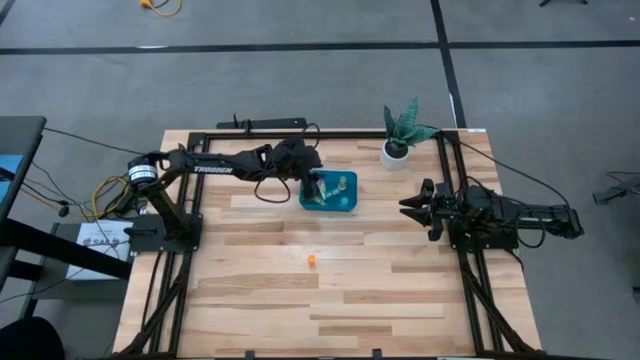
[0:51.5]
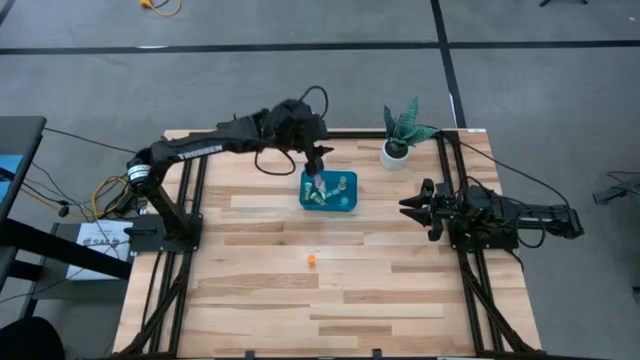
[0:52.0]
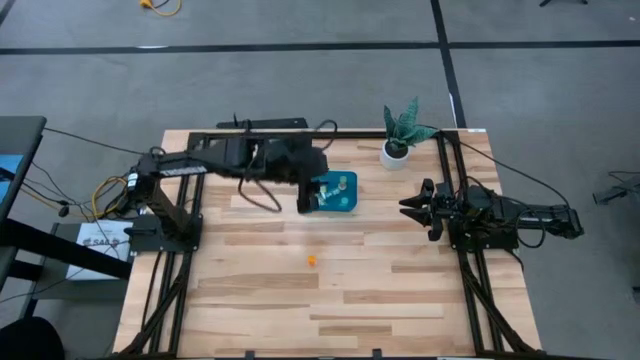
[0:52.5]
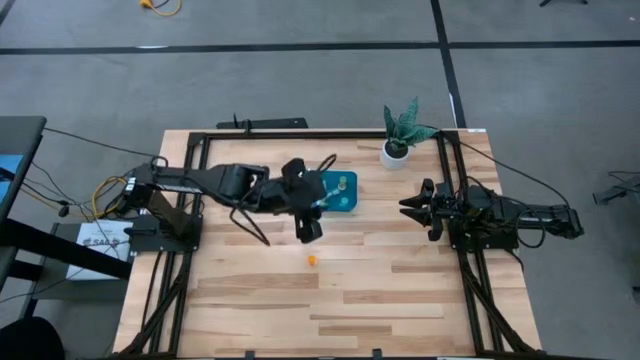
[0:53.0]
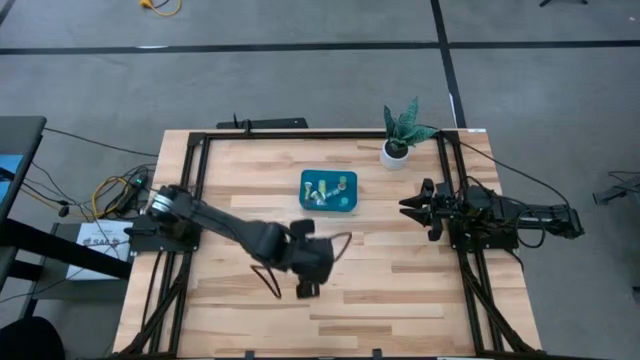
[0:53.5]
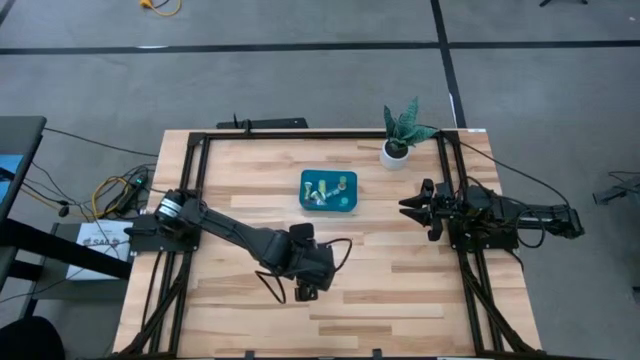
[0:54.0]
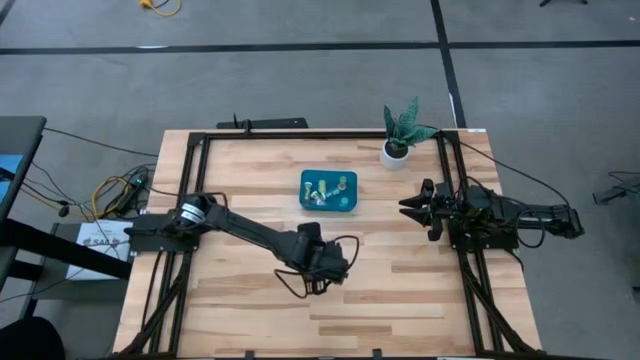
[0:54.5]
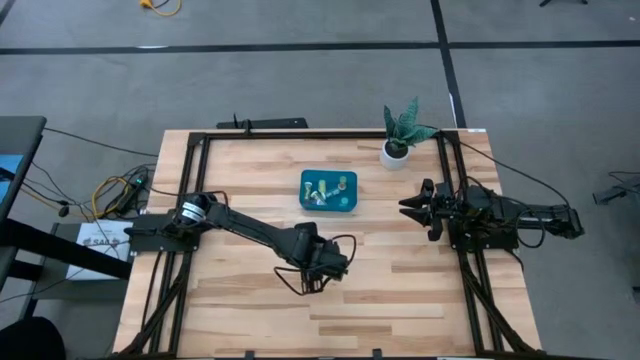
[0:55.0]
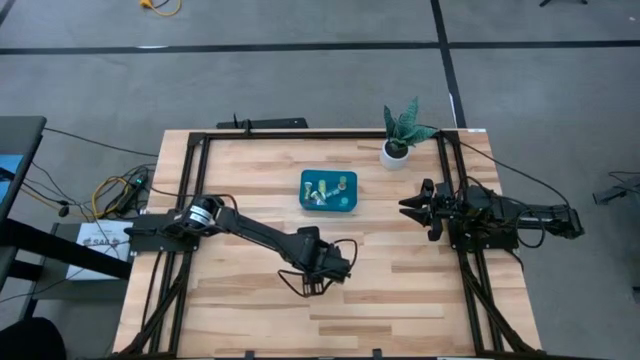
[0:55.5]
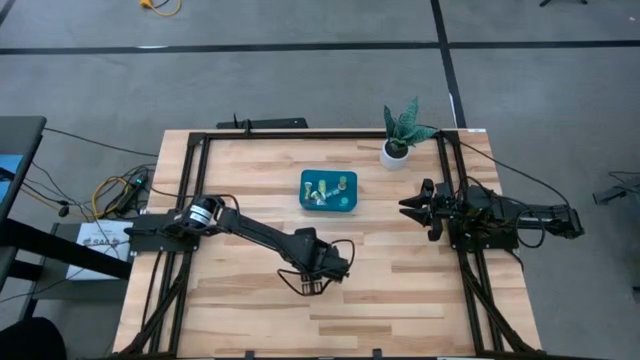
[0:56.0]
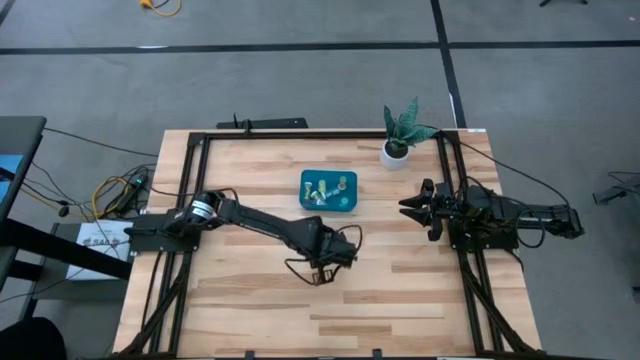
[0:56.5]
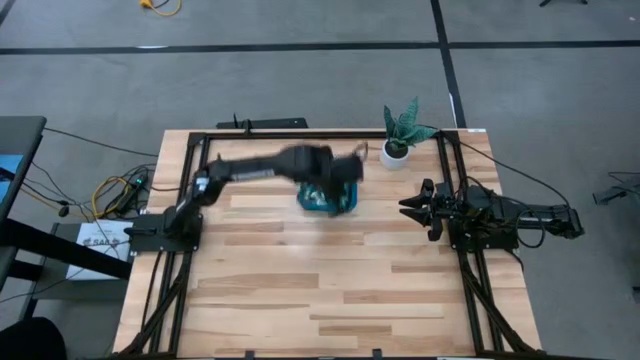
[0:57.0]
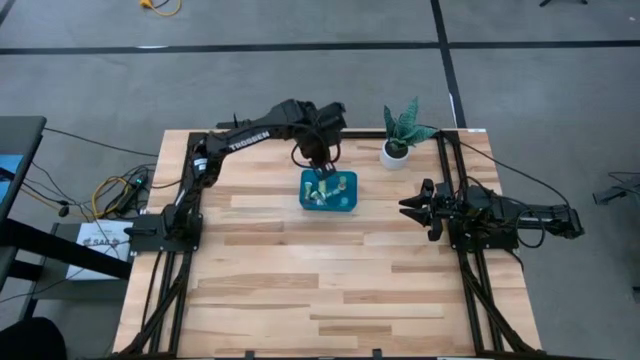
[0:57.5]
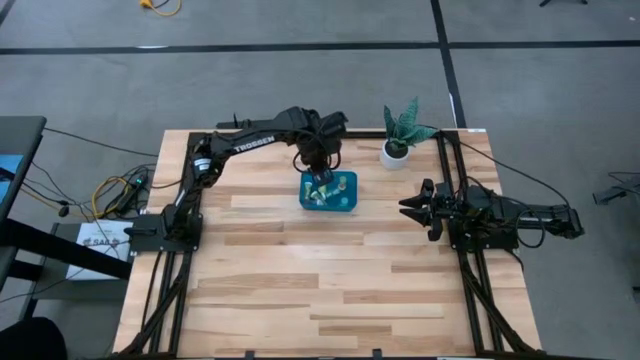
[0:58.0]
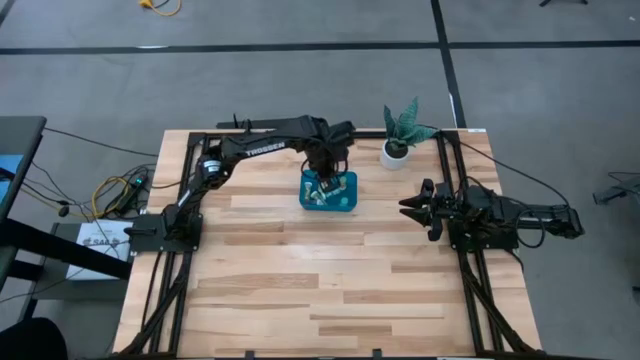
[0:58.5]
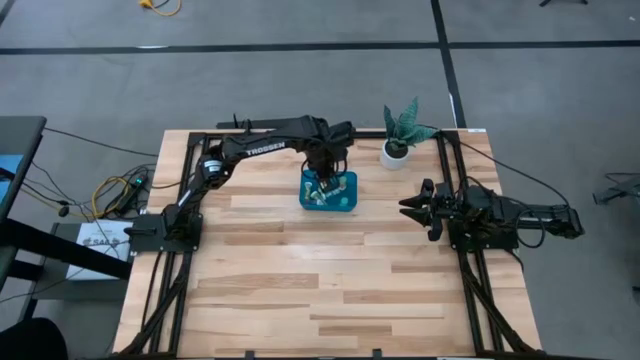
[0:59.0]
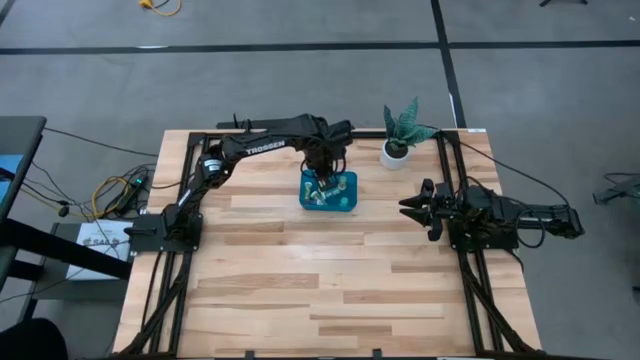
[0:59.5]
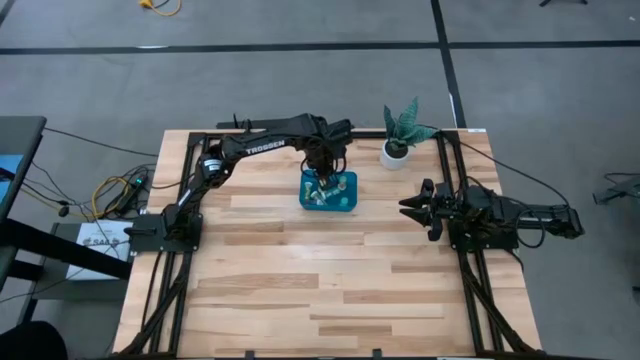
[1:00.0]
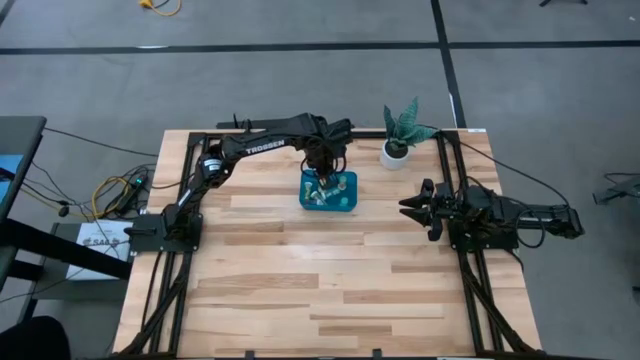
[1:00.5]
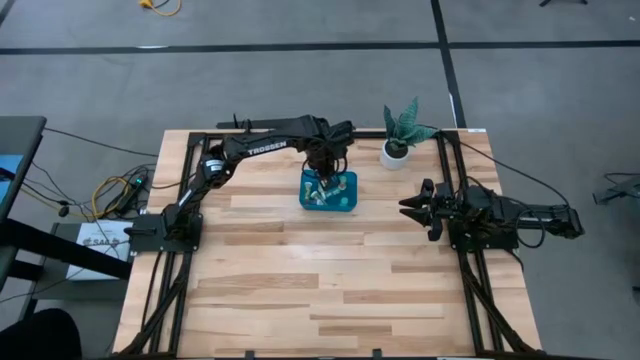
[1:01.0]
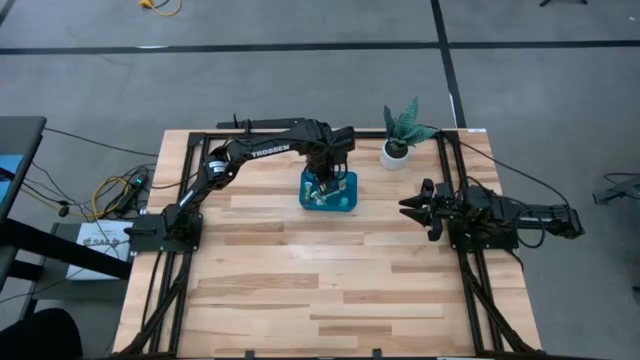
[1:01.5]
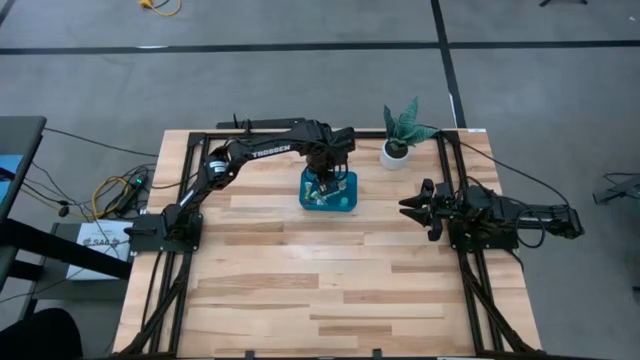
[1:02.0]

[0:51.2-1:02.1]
Task: Pick and place pill bottles into a basket
Put the orange medicine bottle into the blue bin

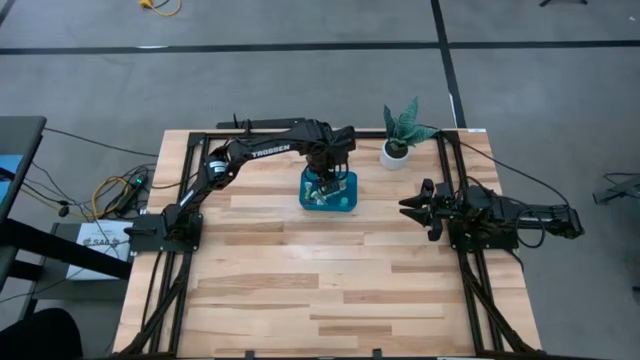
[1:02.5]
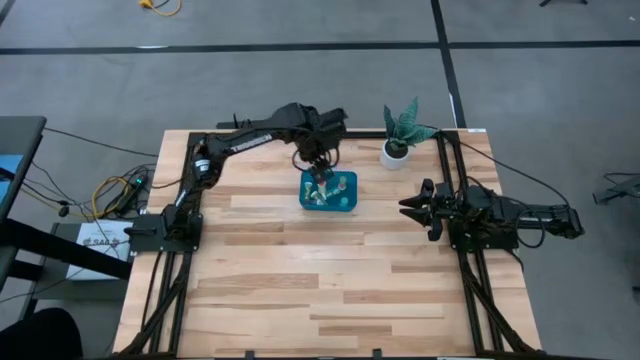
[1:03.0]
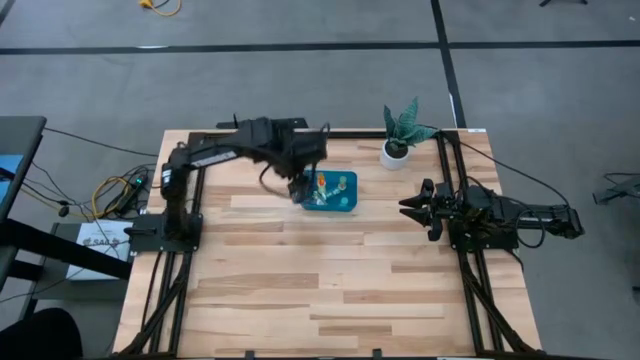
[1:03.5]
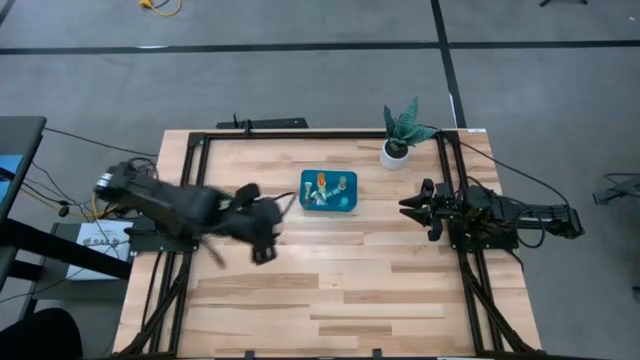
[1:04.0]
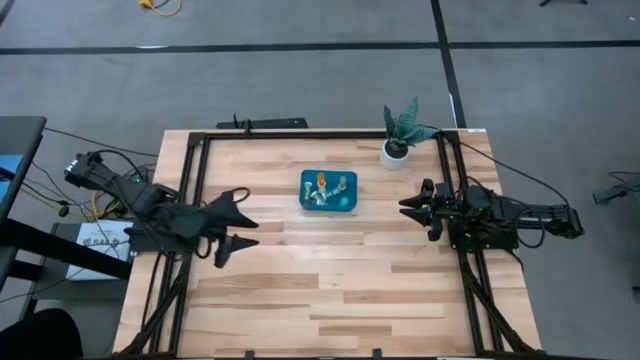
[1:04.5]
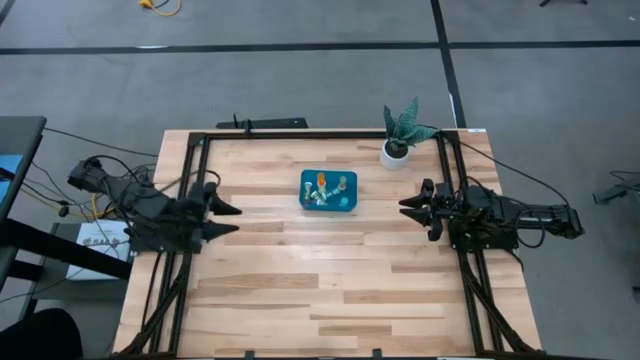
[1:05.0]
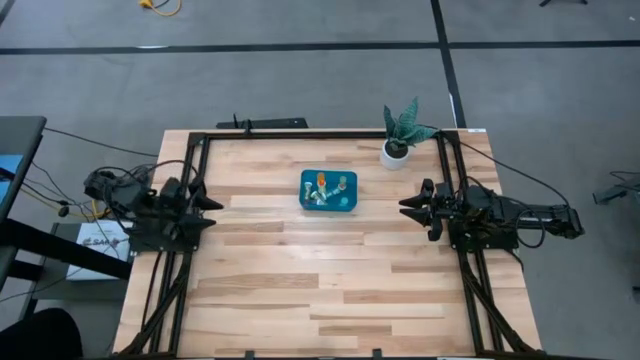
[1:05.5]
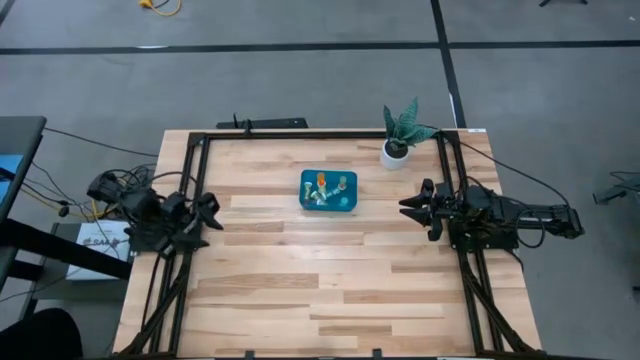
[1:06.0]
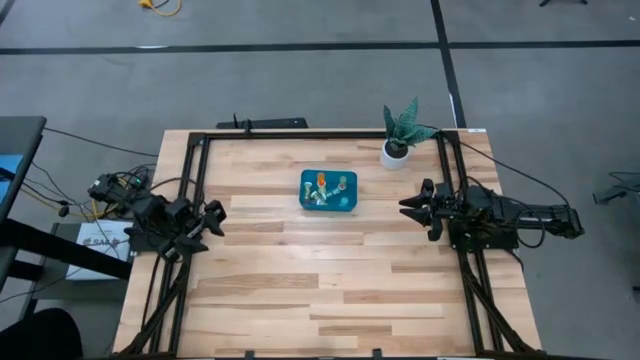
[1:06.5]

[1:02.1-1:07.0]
Return to Home Position

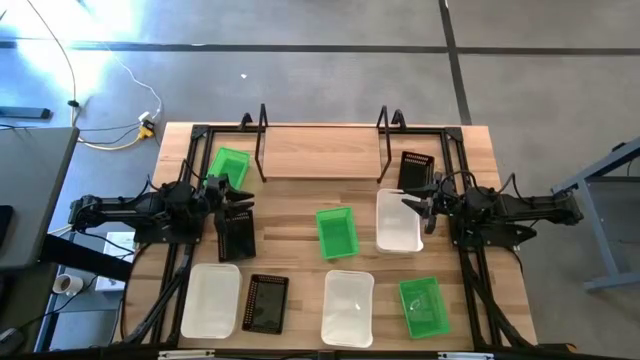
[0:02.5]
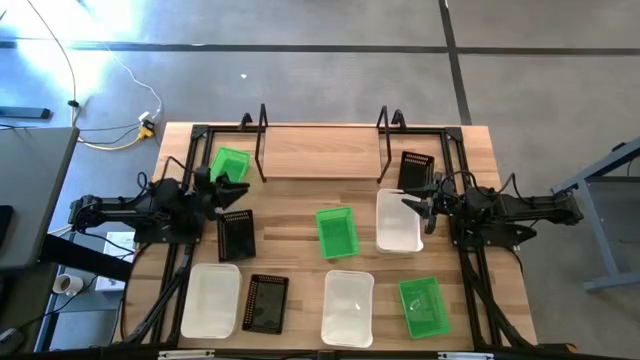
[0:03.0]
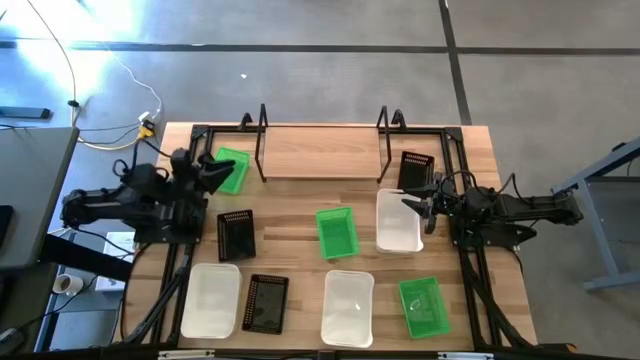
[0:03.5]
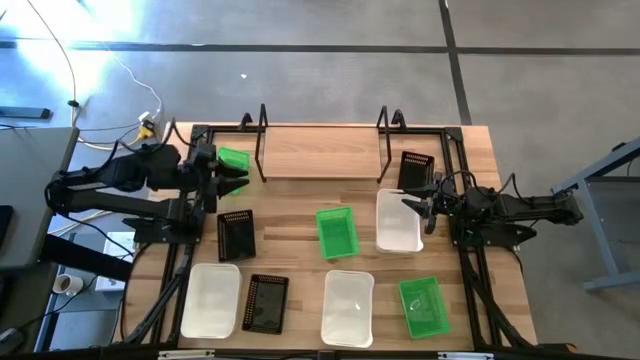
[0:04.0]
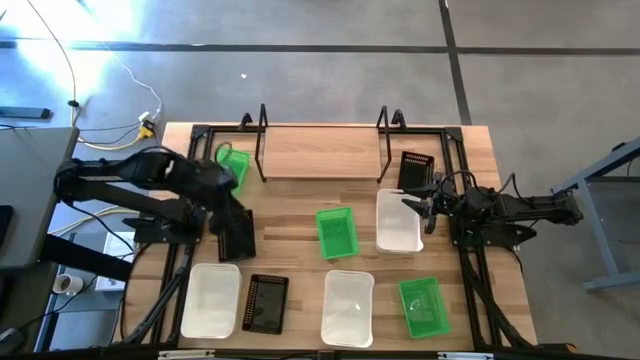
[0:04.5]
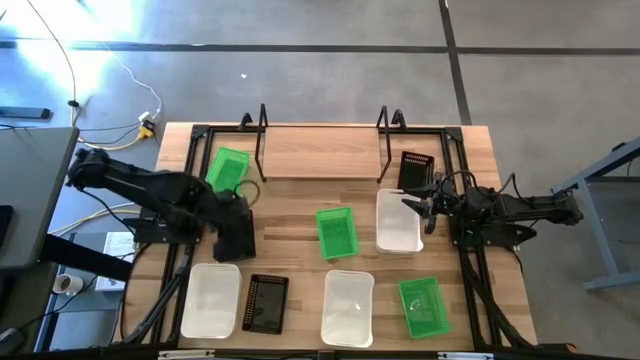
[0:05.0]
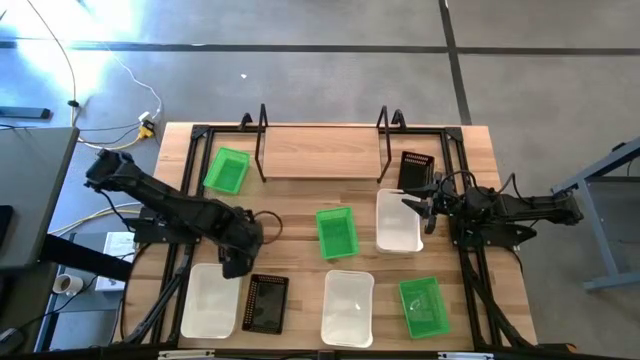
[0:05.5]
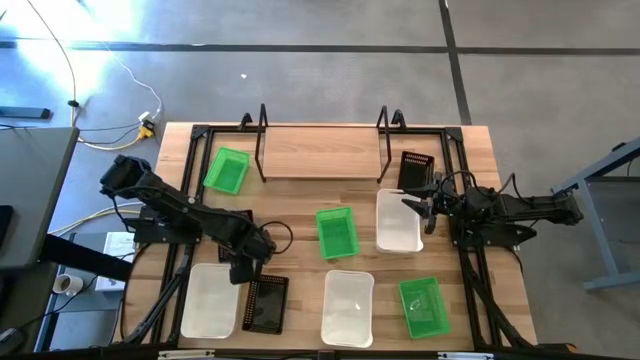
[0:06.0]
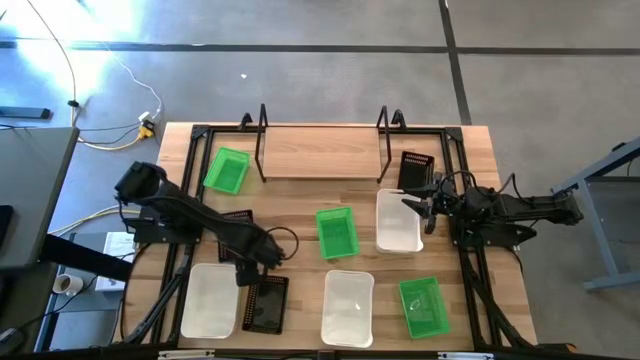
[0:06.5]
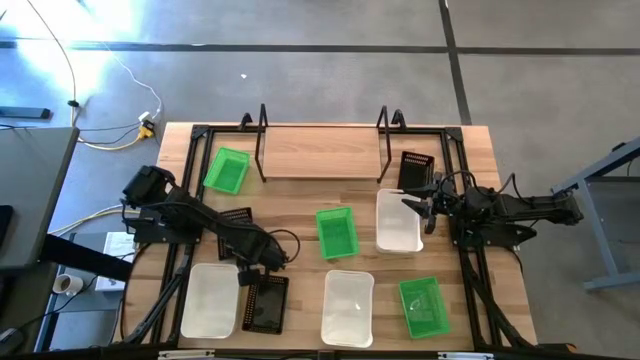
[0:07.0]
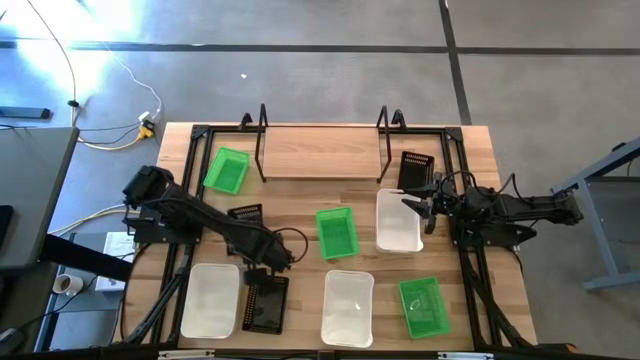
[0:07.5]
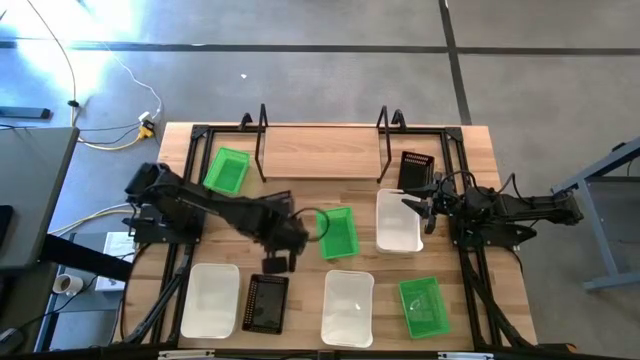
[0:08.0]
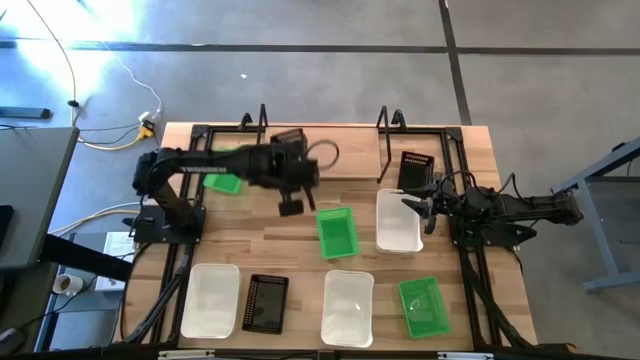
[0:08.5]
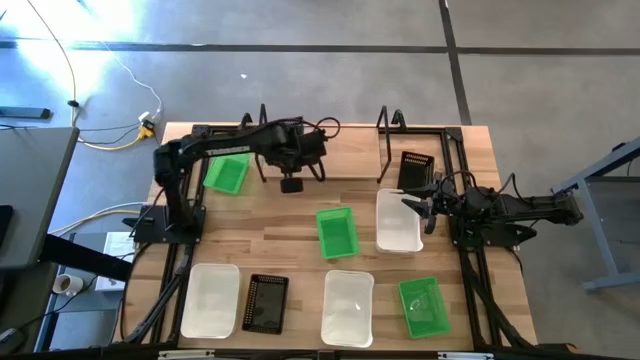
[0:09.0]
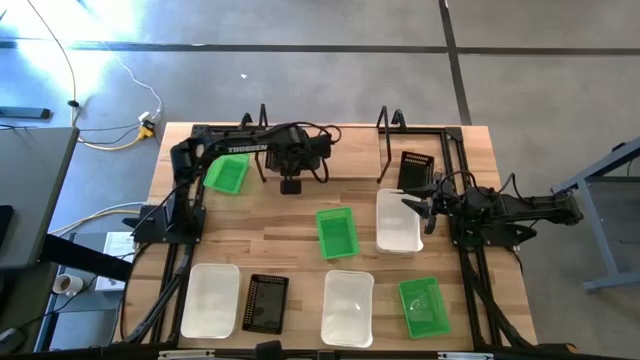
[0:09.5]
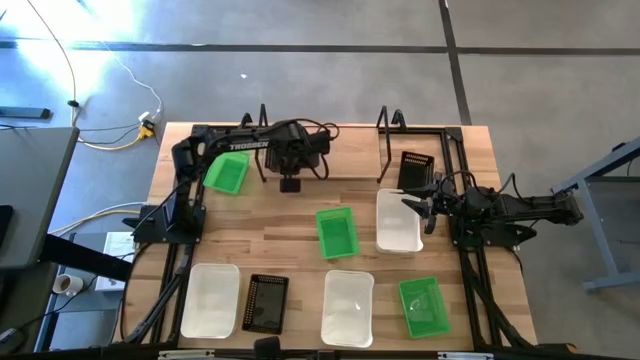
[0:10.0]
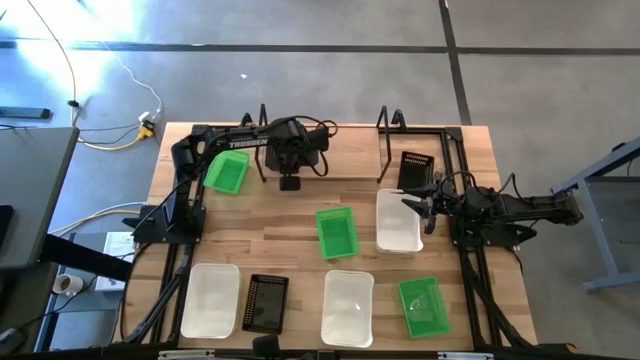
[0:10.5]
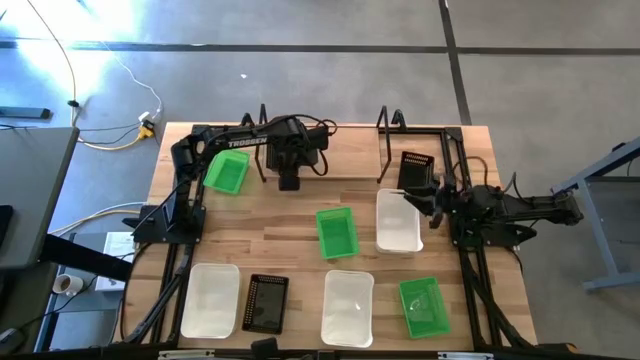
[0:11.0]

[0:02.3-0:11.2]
Task: Stack baskets on shelf by color
Put the middle left black bin on the shelf
